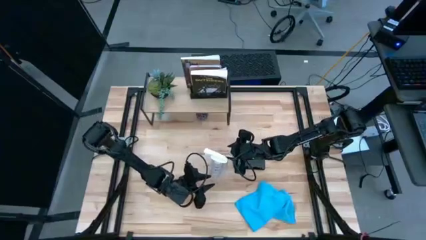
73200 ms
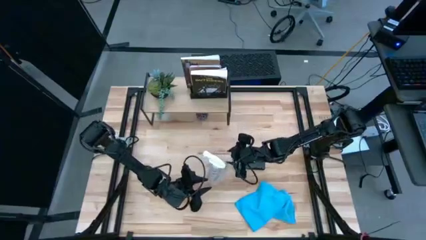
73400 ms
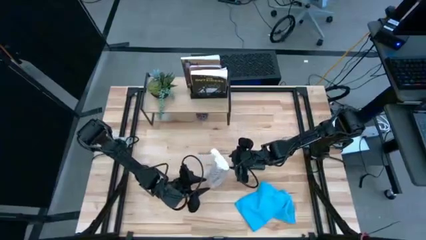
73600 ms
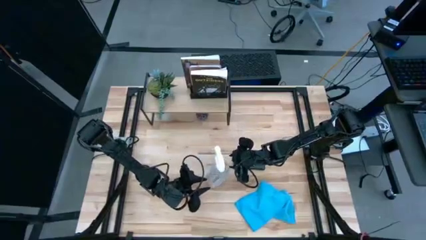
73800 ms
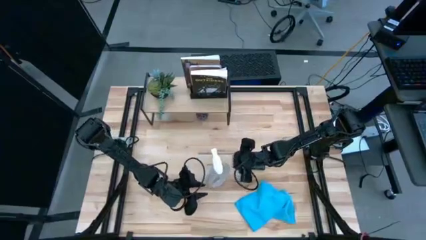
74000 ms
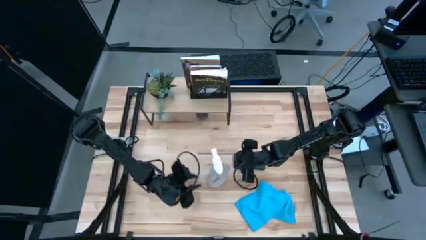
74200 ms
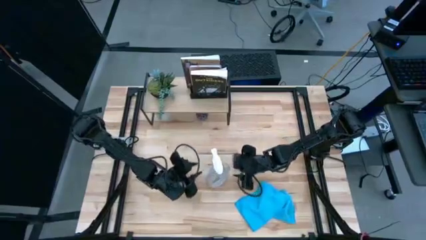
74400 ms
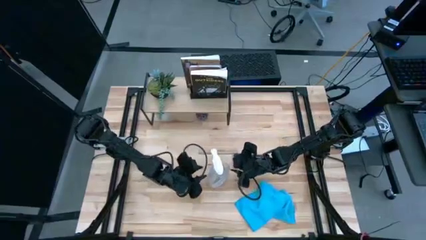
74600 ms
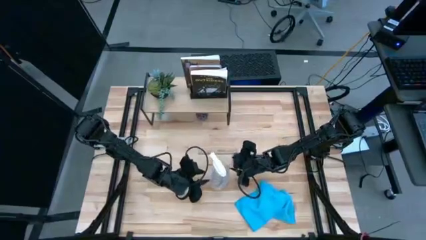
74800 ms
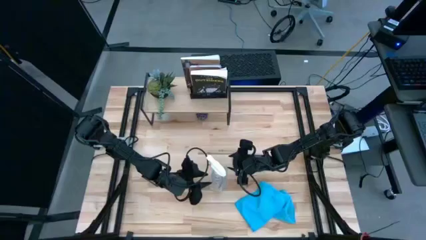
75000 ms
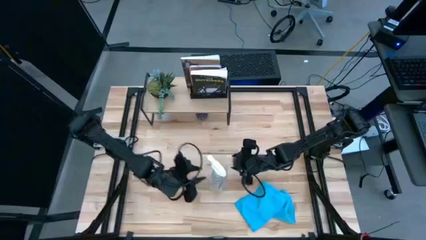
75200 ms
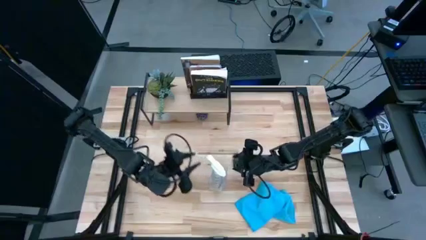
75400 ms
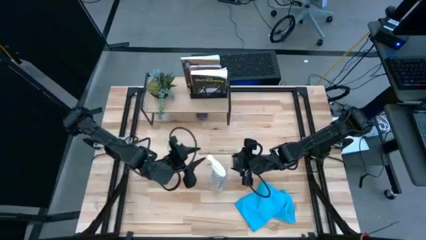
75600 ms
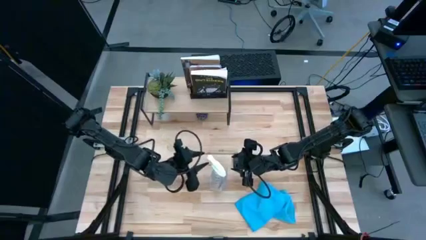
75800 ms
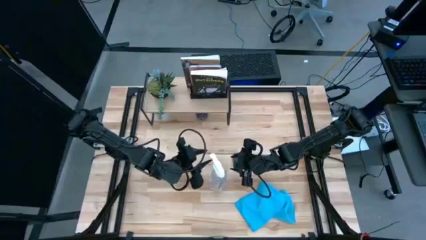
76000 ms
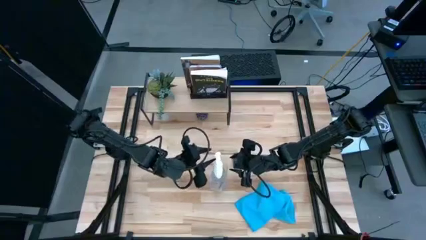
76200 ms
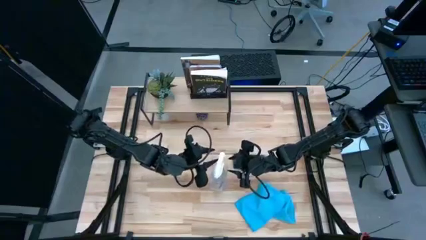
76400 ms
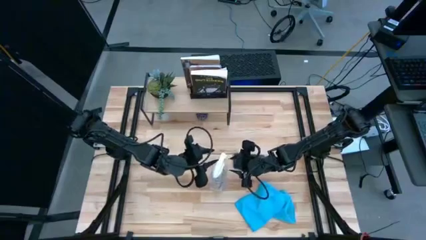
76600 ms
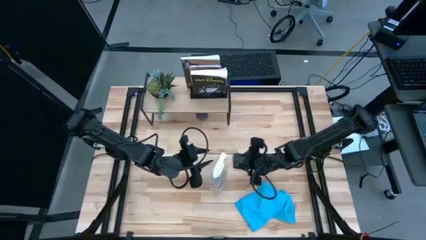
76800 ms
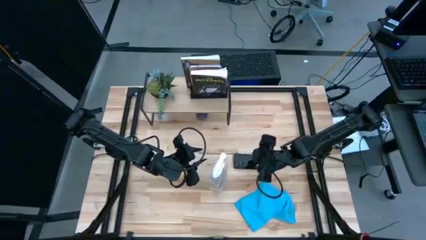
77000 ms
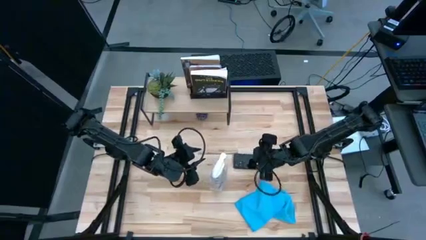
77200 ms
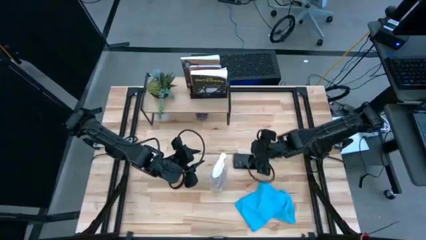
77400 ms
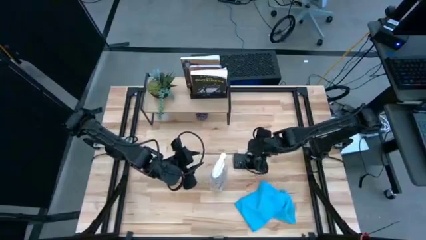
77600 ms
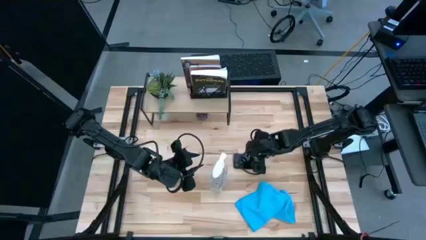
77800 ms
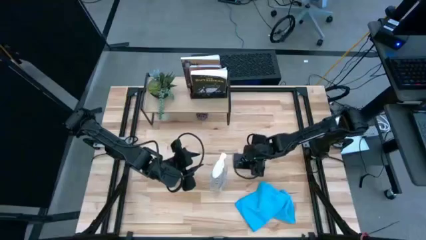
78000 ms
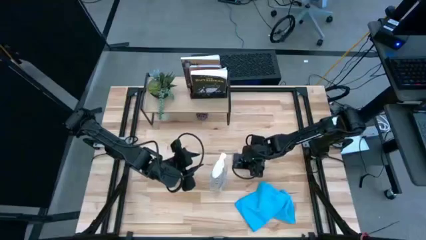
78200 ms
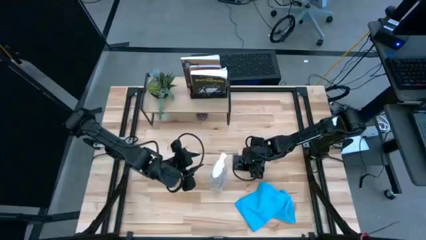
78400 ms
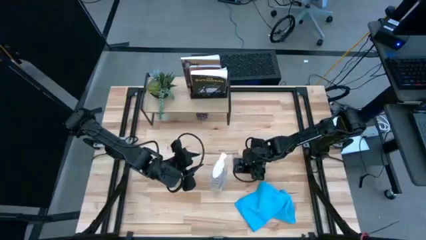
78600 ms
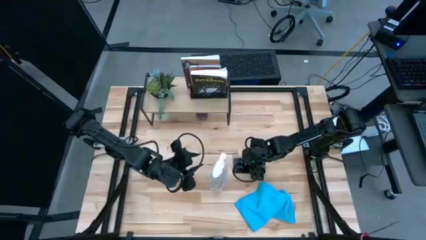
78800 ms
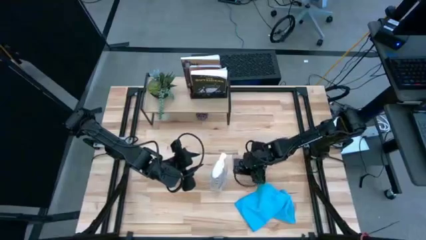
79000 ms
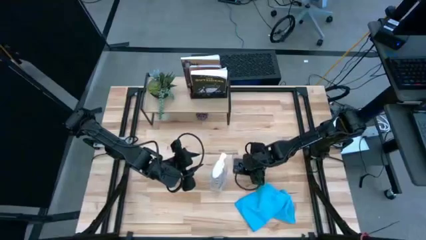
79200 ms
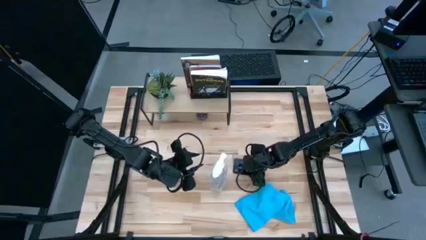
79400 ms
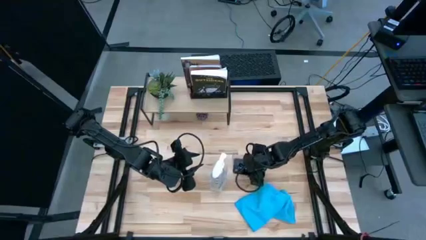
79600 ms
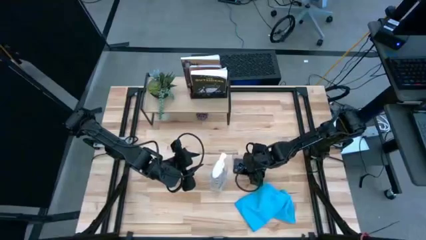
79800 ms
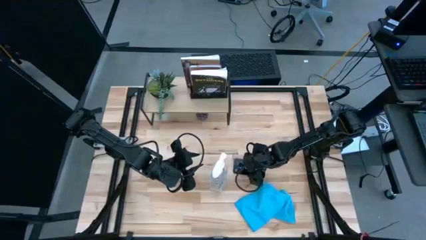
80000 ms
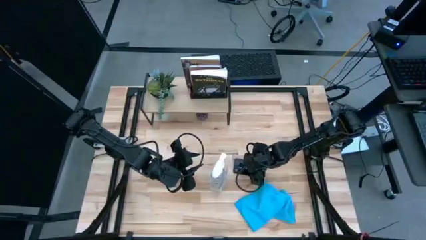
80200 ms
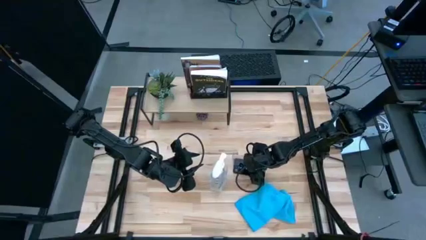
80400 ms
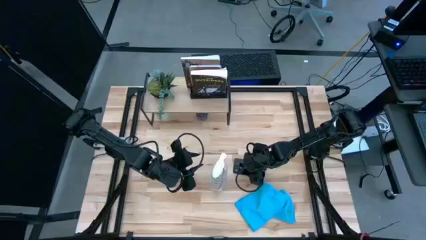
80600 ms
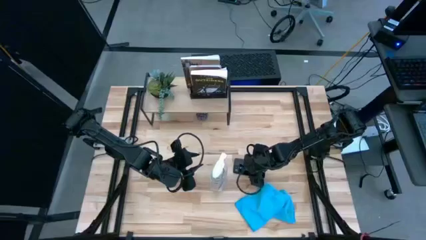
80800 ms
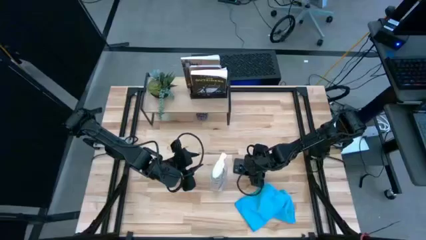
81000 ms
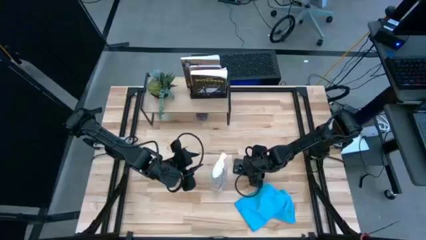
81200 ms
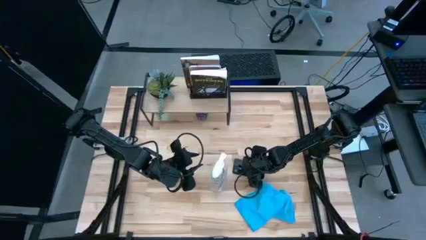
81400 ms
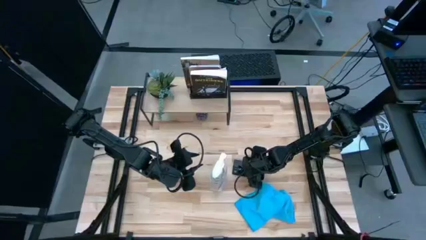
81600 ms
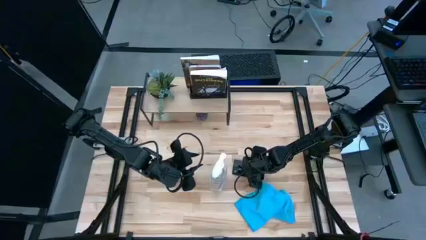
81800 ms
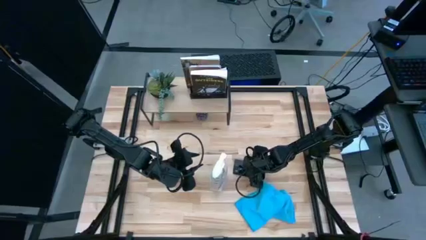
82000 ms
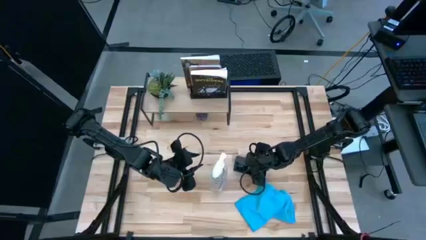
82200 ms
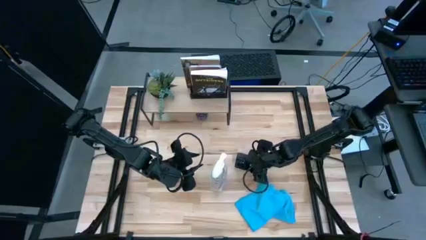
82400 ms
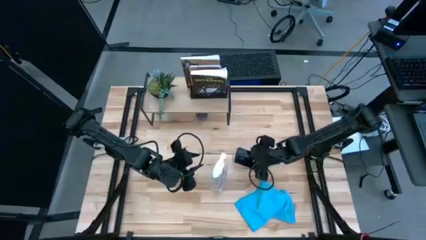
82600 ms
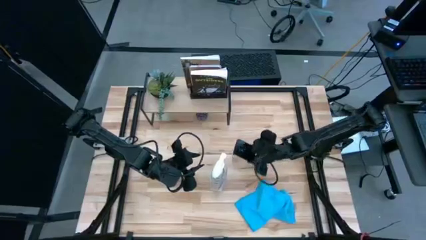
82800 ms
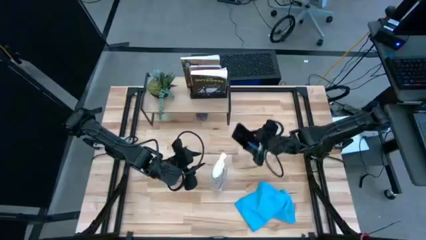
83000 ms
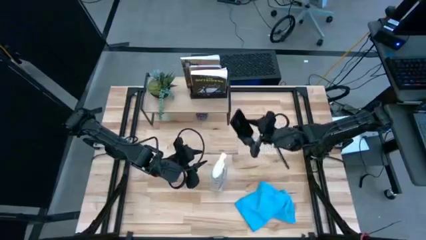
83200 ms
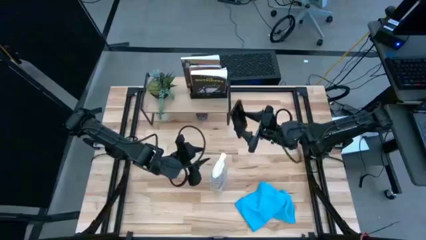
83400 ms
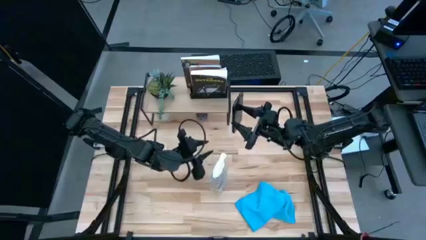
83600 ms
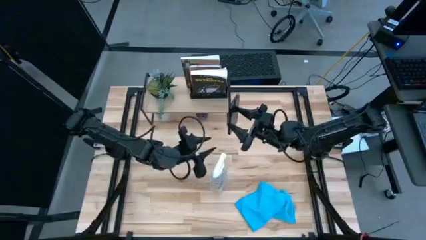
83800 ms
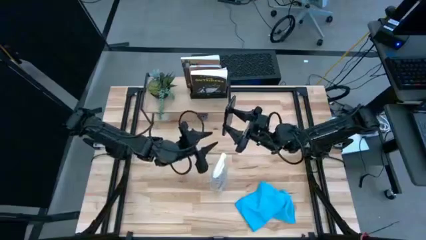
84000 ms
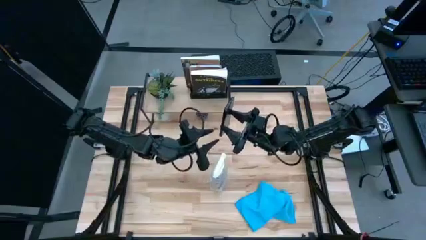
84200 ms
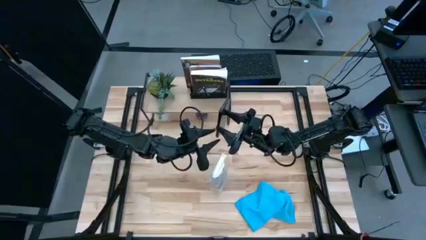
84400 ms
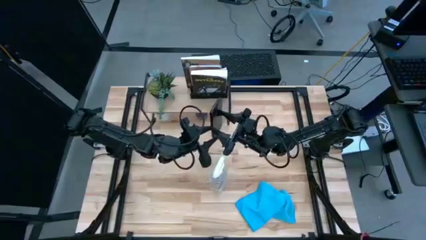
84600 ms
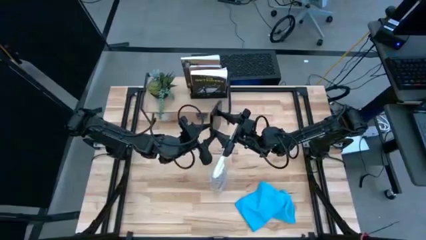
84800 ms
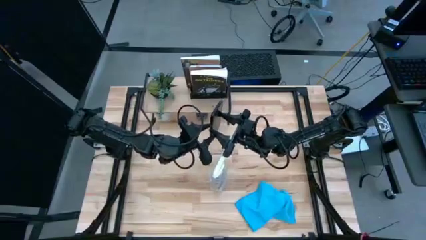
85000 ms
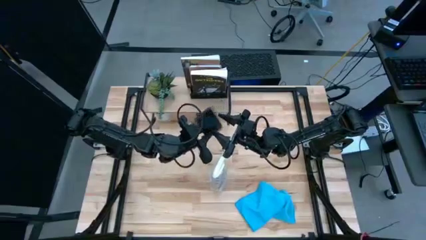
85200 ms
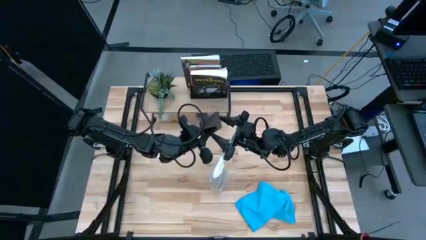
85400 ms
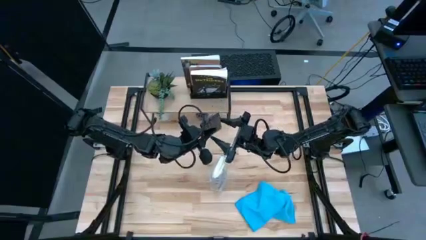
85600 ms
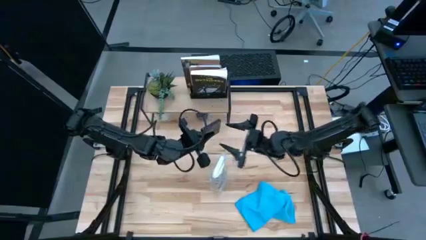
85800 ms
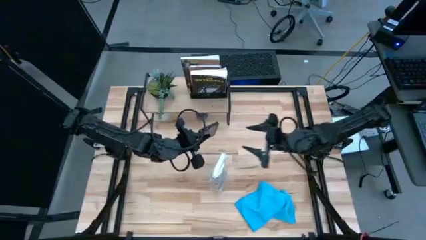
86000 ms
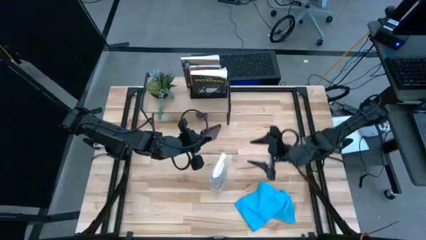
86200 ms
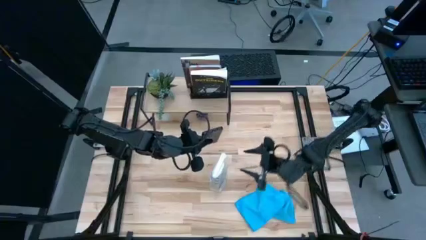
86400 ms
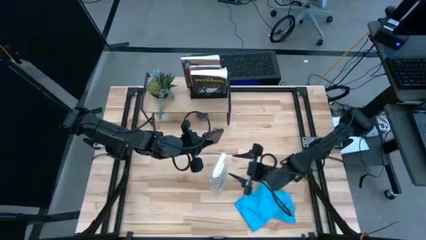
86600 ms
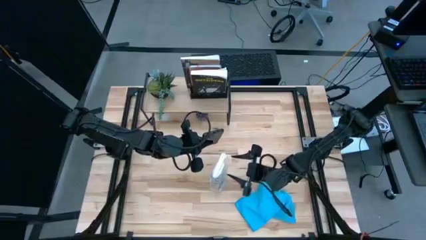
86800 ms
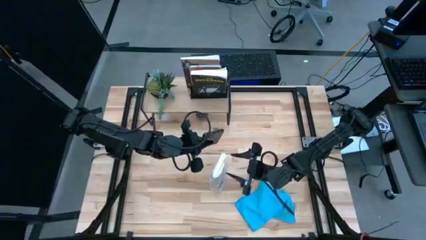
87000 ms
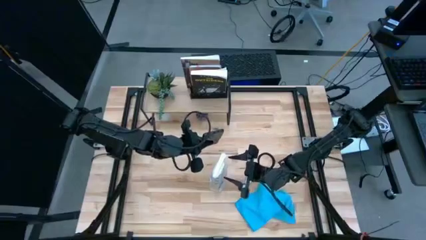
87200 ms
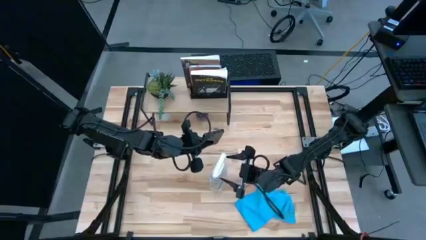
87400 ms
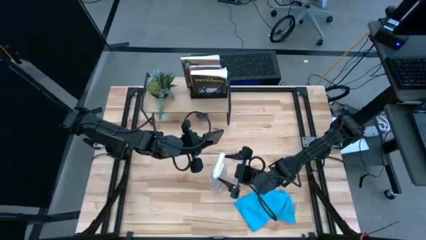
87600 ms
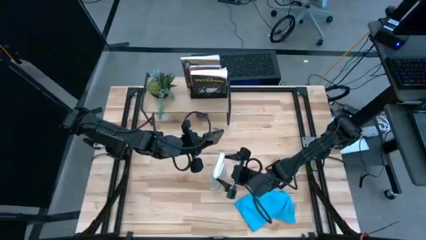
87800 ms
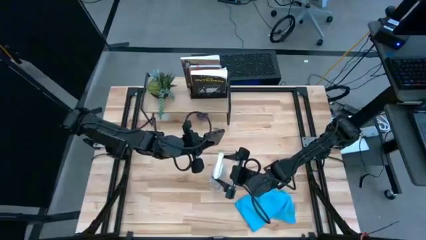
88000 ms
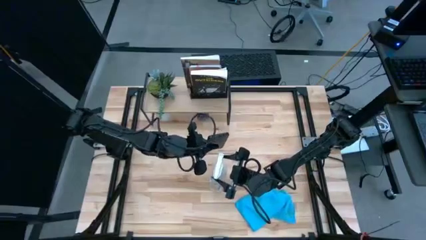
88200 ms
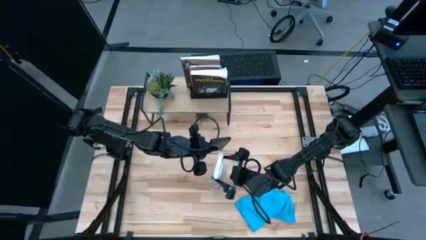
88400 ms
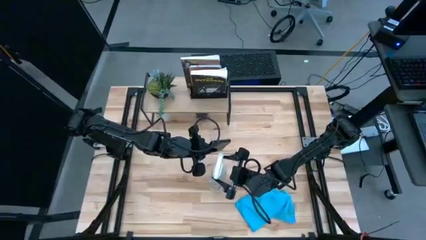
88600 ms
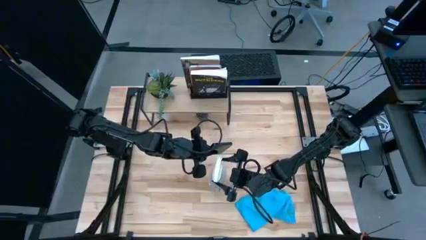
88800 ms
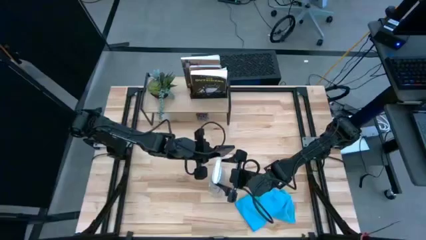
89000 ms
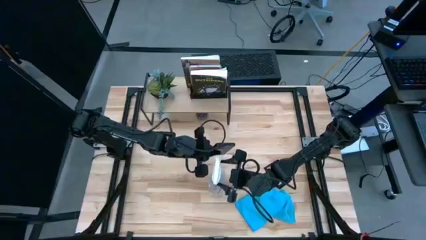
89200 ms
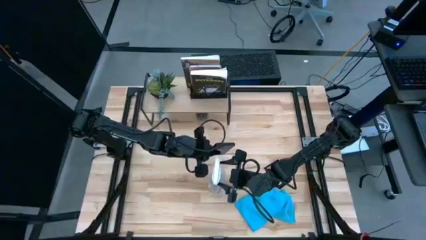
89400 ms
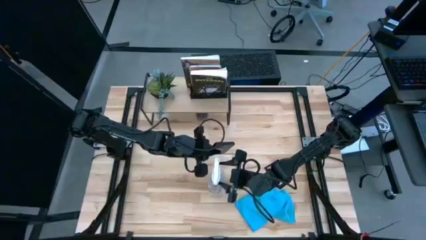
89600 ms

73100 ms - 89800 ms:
Task: Apply microfiber cloth
Spray the back of the black cellphone using the transparent spray bottle
